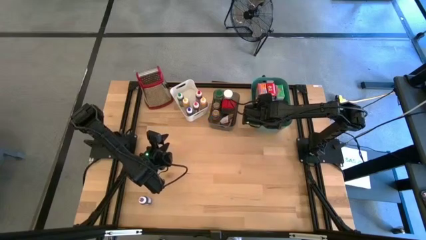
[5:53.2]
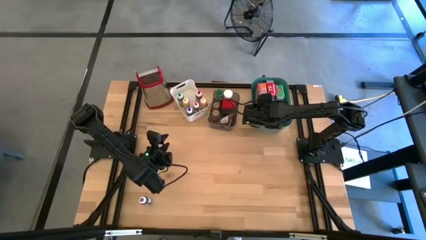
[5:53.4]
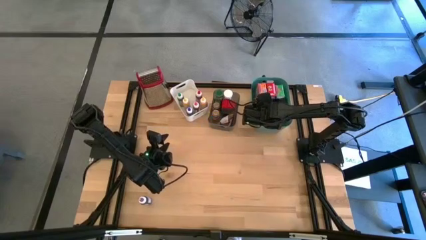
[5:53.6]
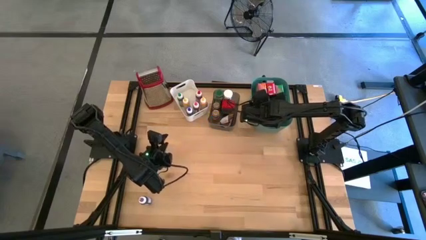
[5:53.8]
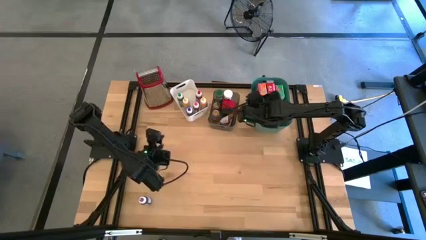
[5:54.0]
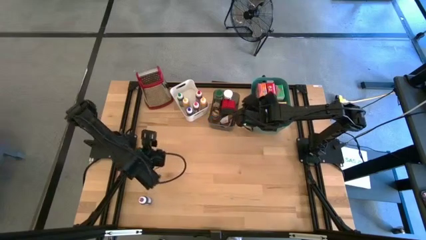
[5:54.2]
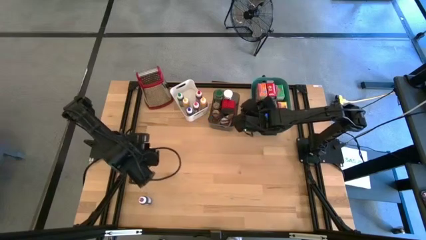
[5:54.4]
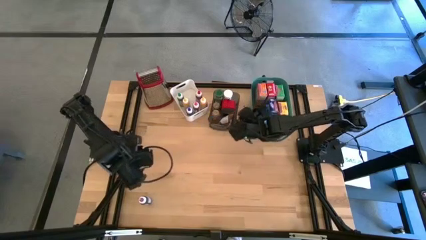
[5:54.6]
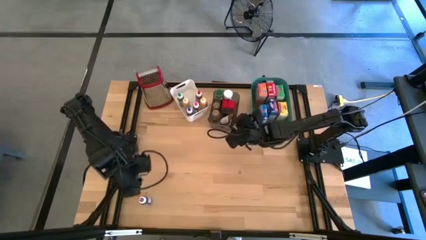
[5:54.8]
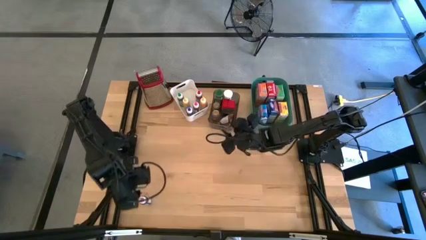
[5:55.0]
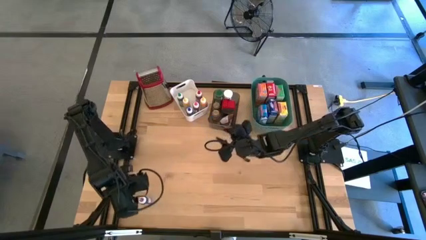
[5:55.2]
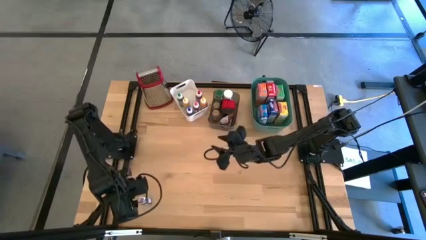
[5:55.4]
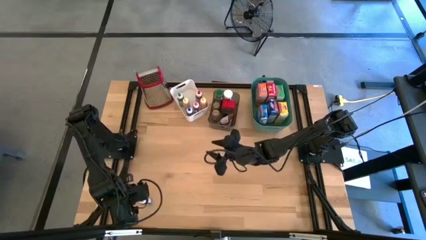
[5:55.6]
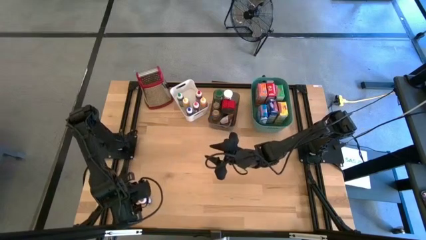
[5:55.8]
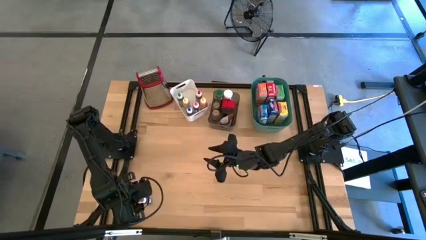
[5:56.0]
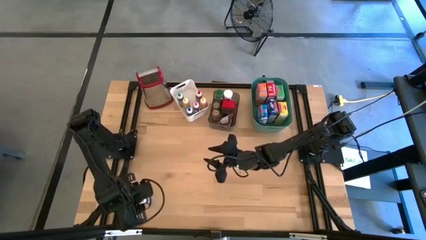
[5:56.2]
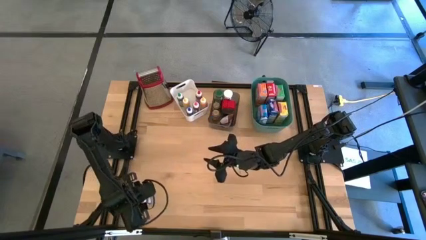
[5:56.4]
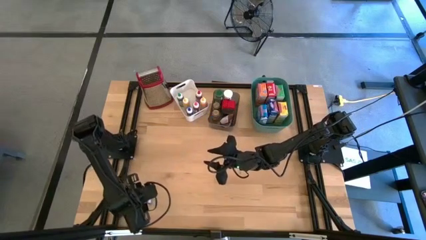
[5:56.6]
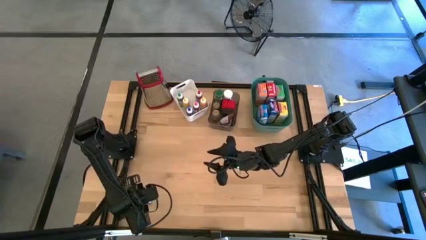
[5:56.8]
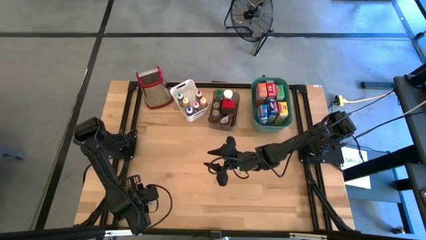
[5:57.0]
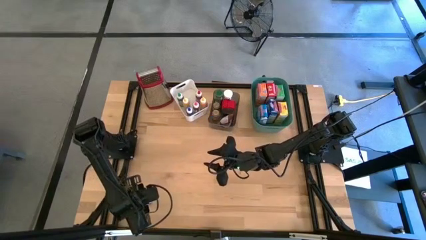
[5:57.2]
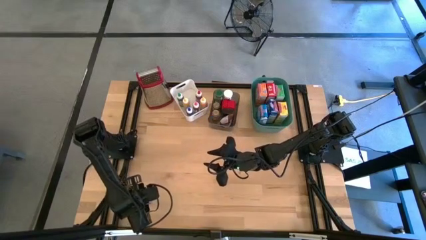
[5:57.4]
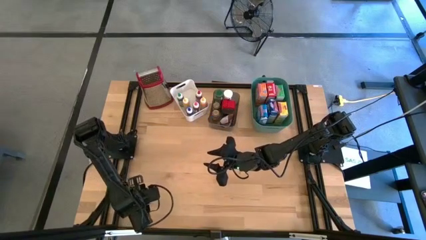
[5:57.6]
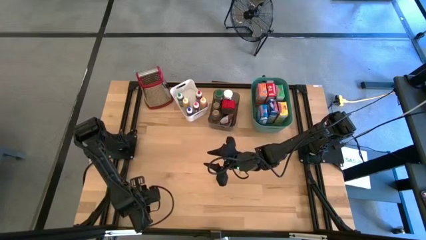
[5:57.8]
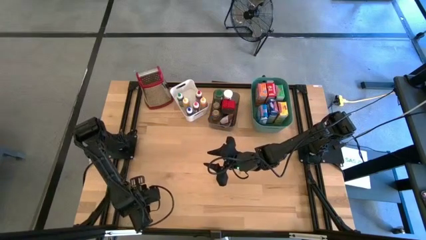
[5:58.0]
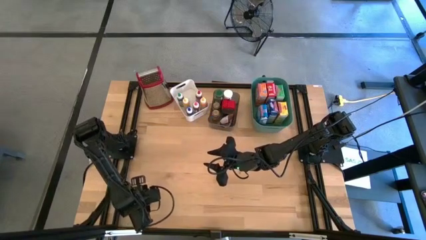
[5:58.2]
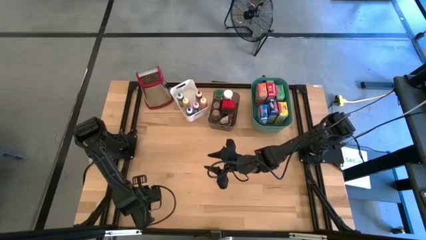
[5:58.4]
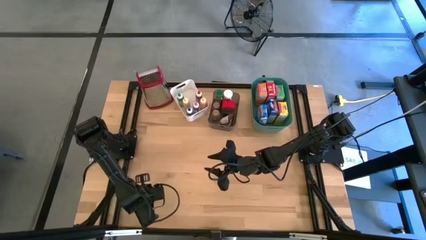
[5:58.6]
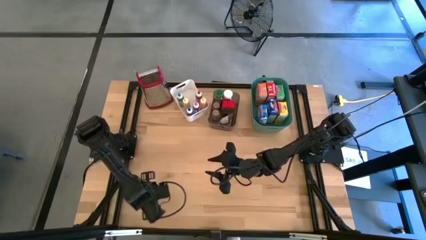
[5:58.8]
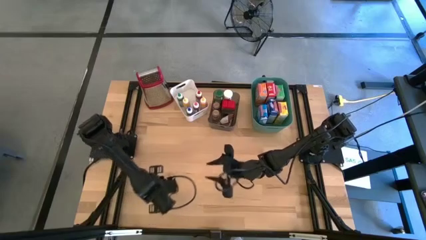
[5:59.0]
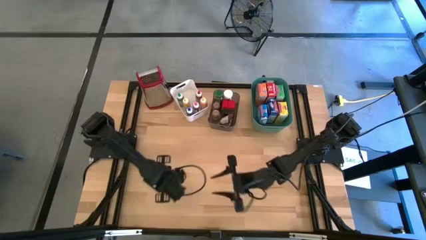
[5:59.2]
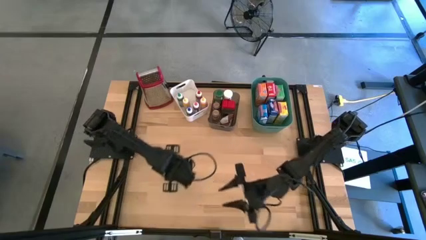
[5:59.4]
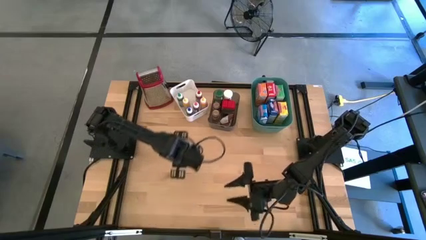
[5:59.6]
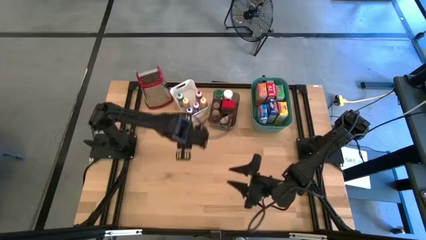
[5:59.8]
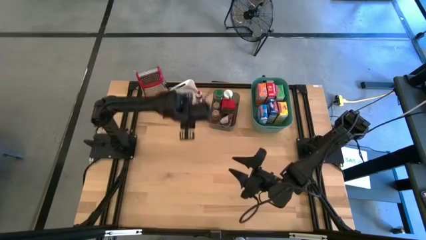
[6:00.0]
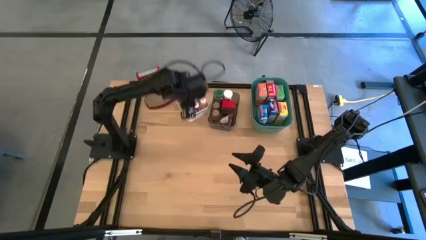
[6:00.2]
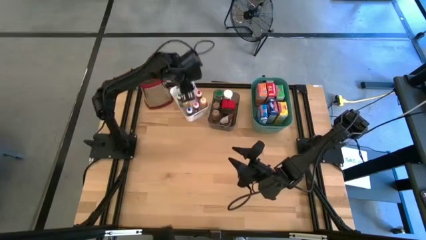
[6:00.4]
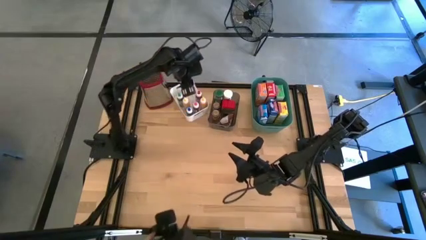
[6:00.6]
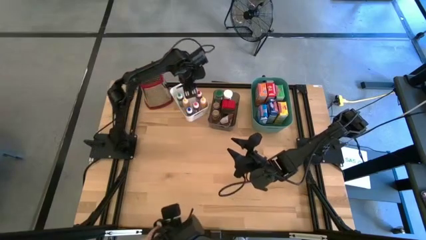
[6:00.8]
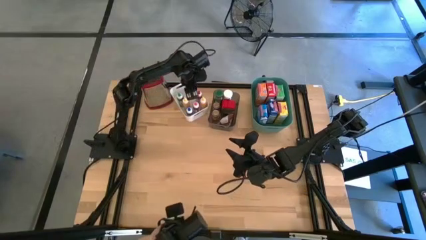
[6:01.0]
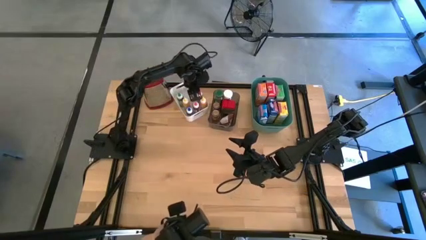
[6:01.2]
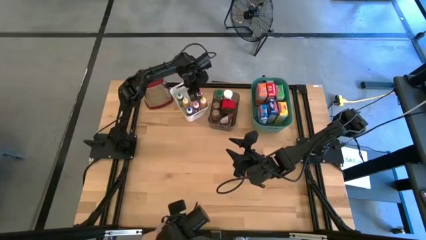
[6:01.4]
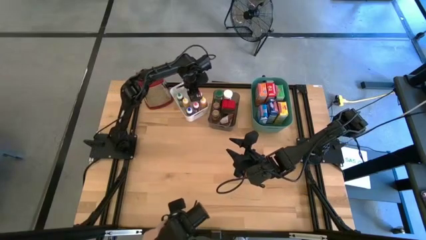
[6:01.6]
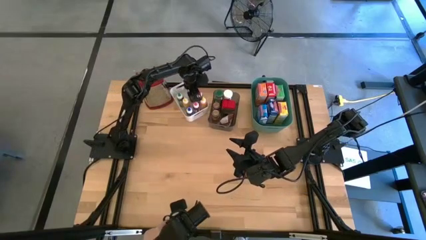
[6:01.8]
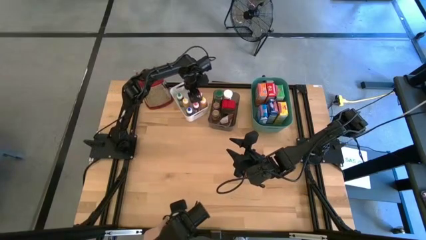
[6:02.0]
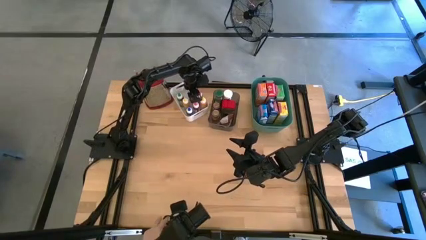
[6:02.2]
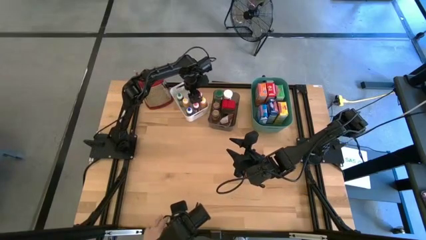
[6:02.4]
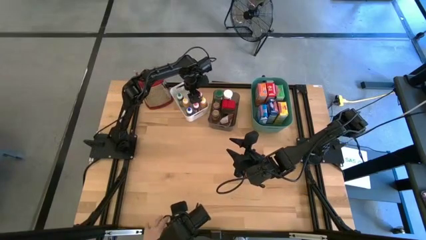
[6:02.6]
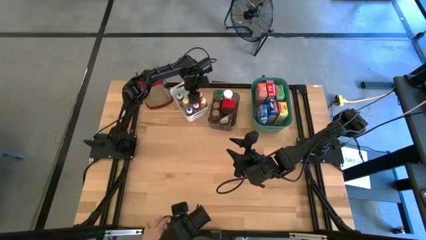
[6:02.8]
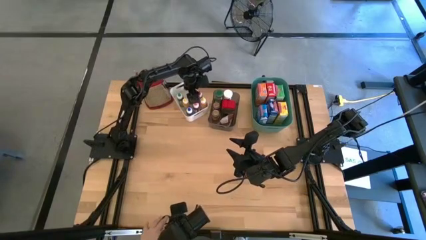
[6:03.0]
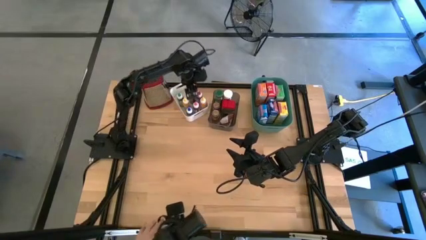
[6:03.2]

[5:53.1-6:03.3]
Task: Pick & Place Kitchen Items
Put the purple food coloring into the white bin

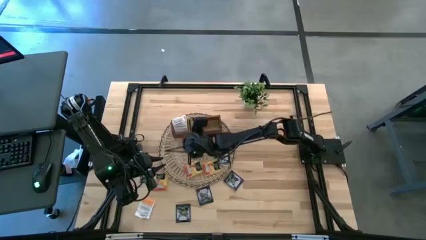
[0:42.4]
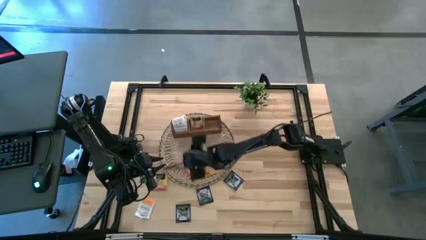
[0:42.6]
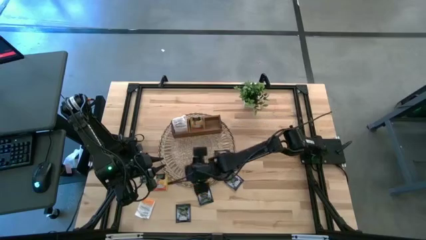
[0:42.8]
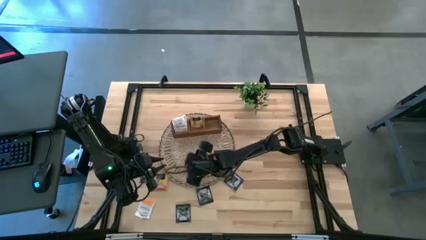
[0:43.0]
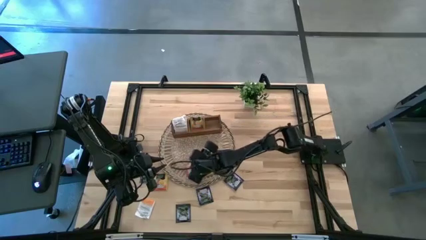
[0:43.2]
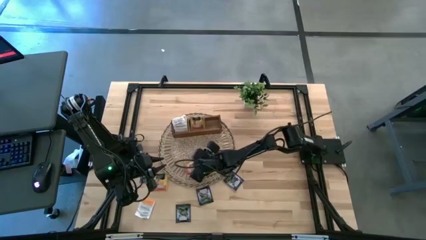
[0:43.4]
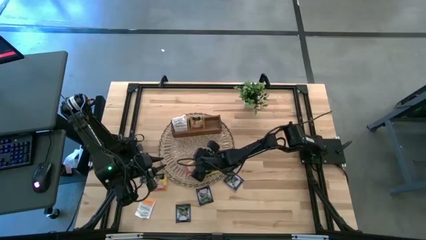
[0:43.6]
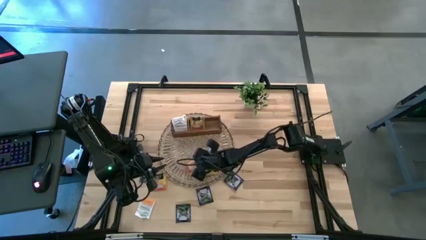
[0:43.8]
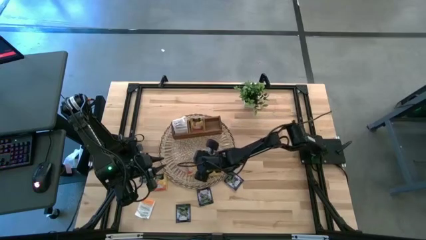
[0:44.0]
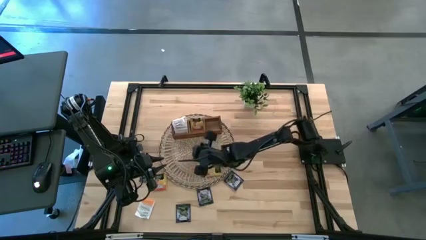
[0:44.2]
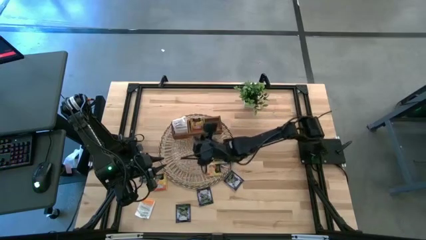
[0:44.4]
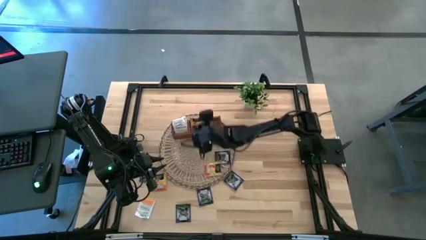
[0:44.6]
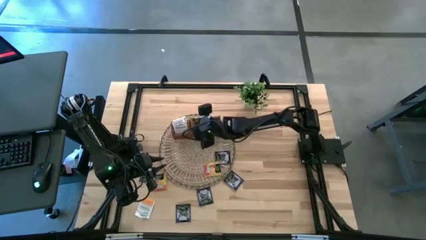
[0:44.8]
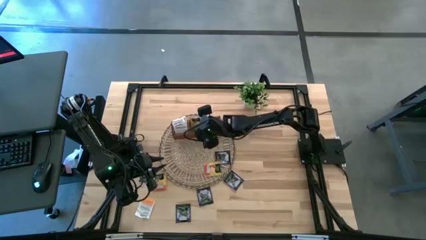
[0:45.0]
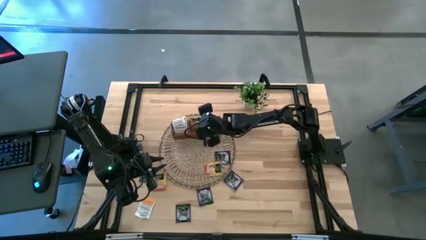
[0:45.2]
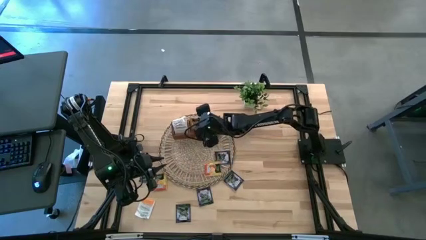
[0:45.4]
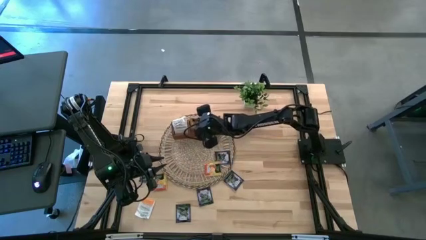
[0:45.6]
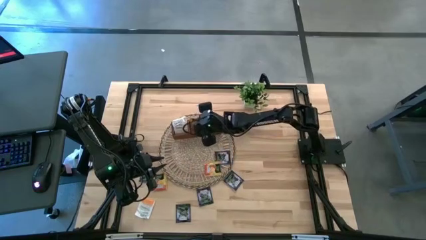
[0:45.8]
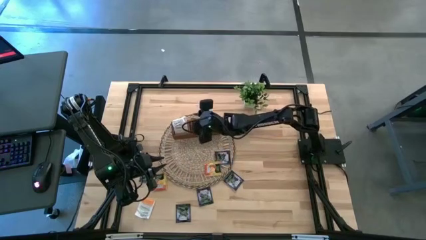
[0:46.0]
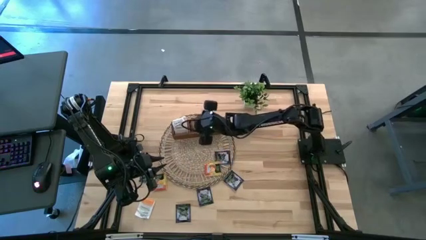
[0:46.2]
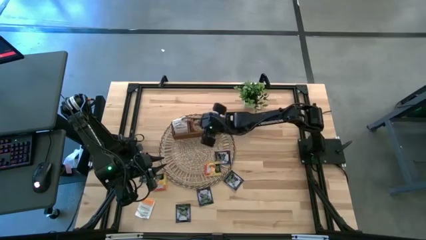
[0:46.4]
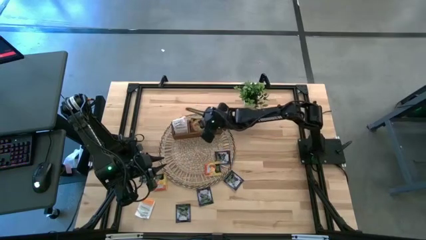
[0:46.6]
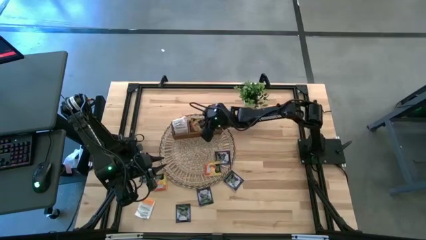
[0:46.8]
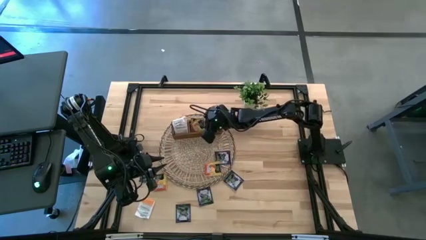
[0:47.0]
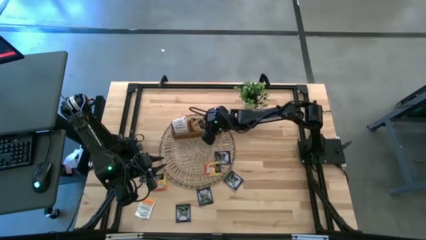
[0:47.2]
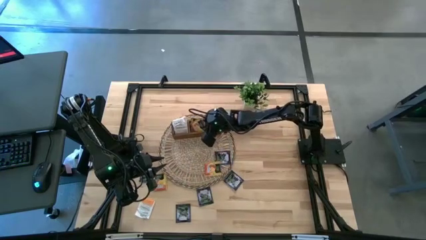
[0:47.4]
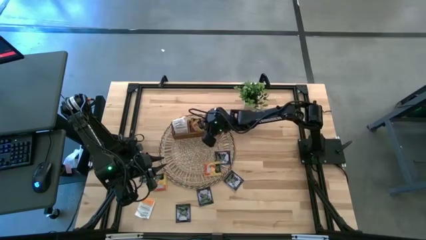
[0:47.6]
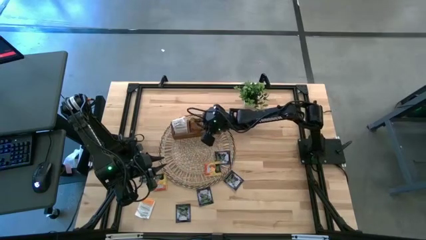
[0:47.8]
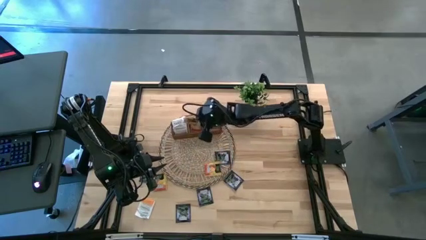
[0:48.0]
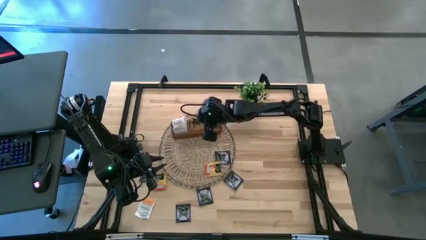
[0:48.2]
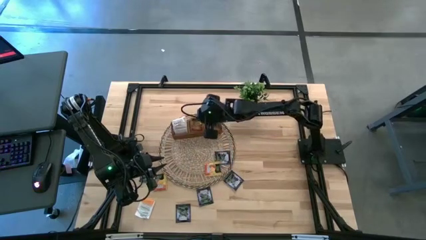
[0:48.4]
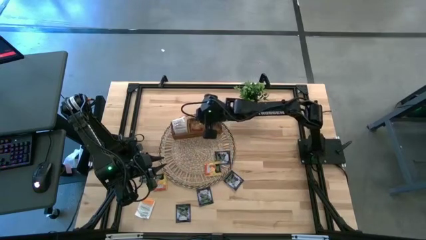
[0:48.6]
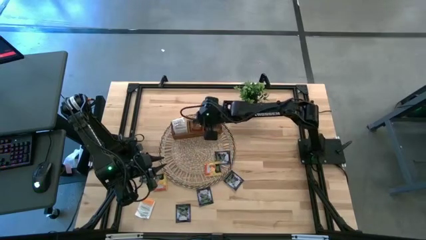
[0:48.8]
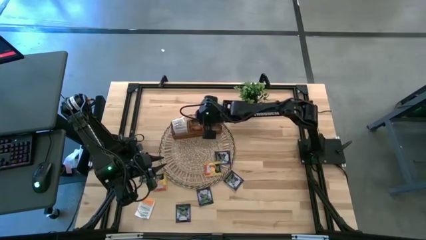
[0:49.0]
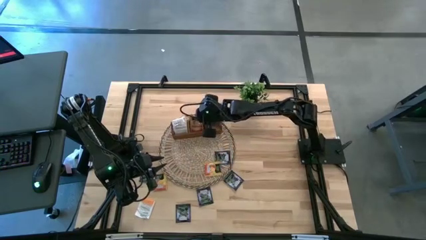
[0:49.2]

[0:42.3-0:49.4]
Task: Pick & Place Tea
Put the orange tea packet into the middle compartment of the wooden organizer
